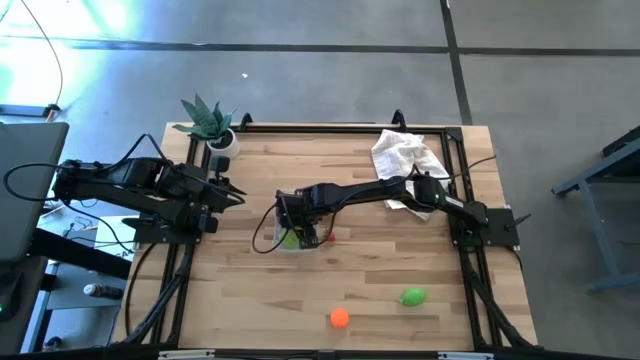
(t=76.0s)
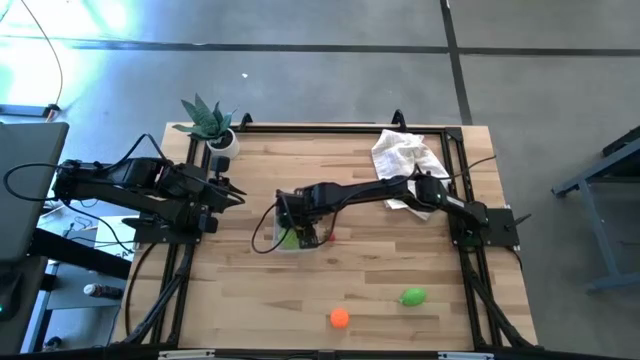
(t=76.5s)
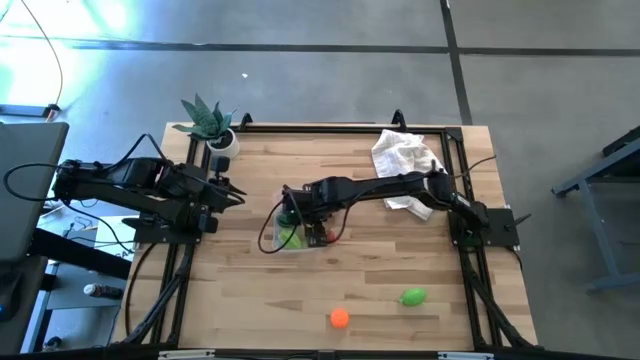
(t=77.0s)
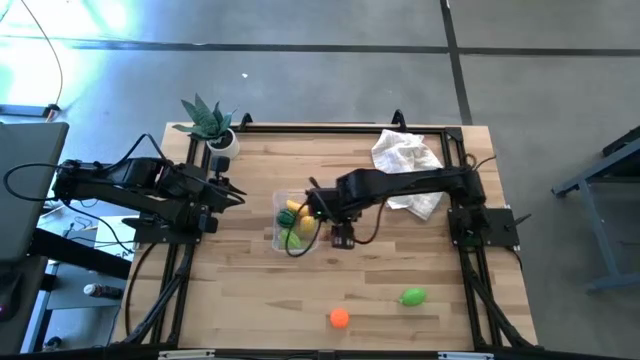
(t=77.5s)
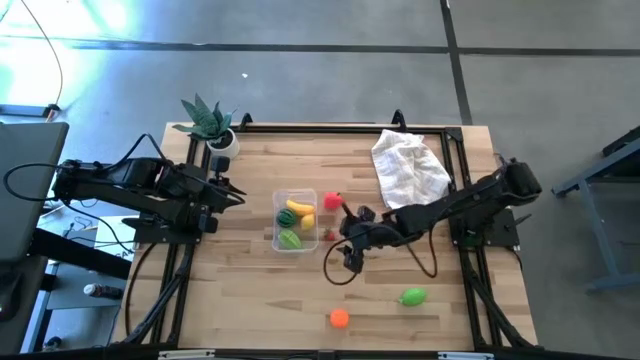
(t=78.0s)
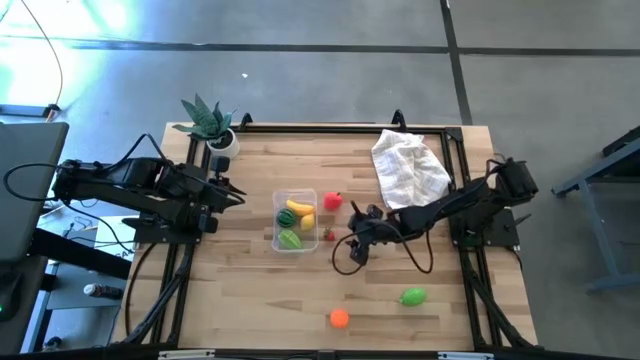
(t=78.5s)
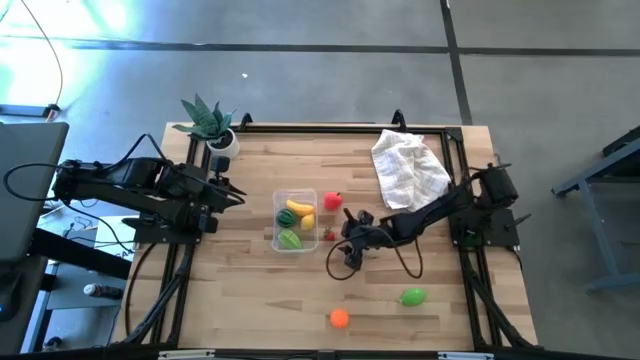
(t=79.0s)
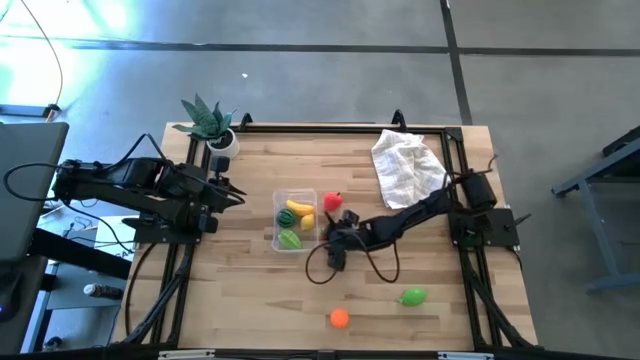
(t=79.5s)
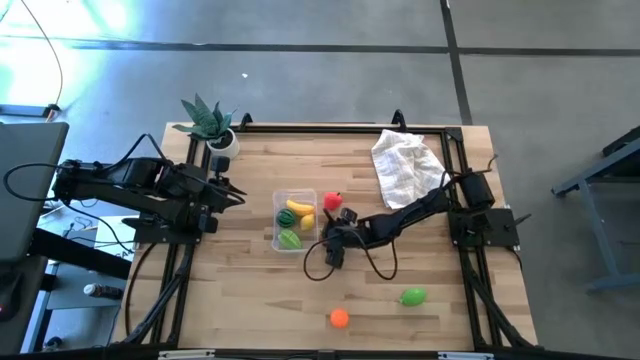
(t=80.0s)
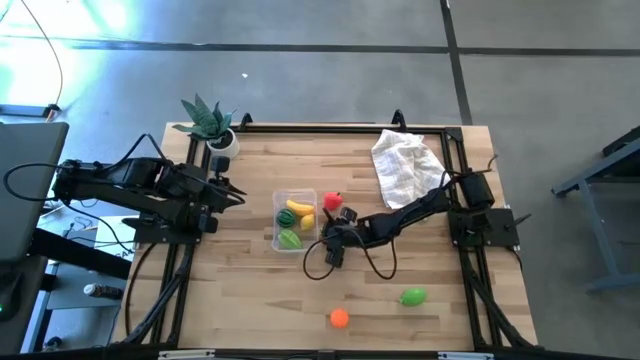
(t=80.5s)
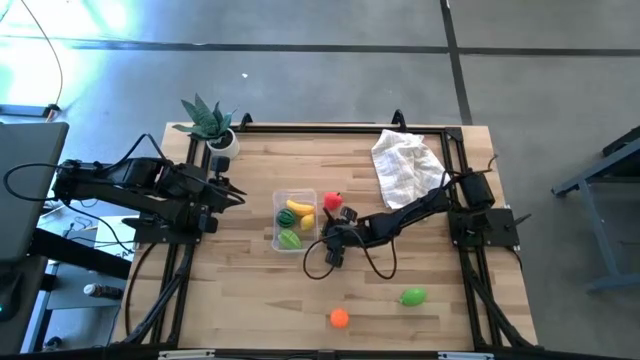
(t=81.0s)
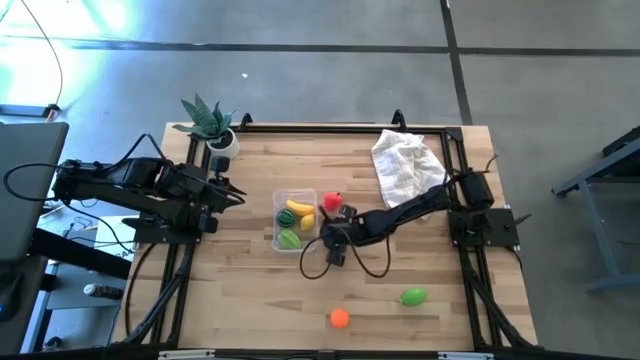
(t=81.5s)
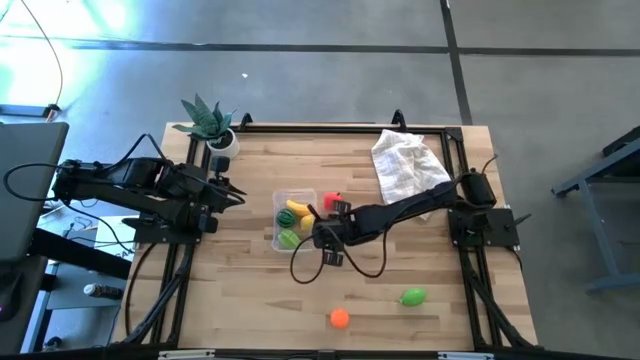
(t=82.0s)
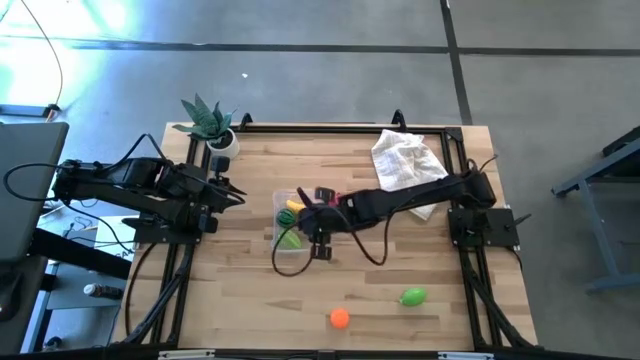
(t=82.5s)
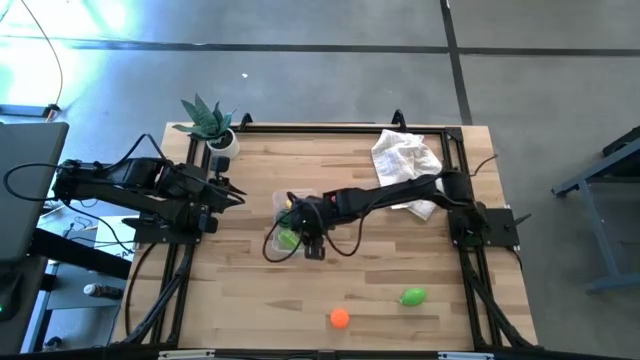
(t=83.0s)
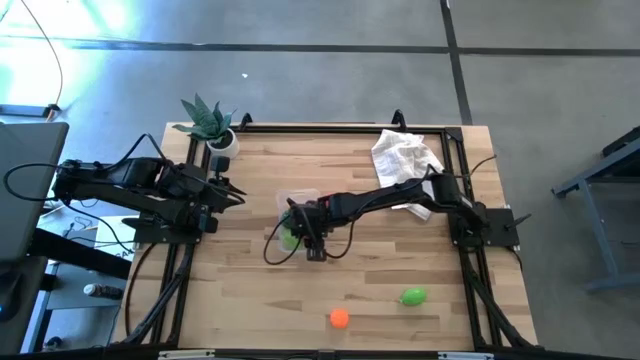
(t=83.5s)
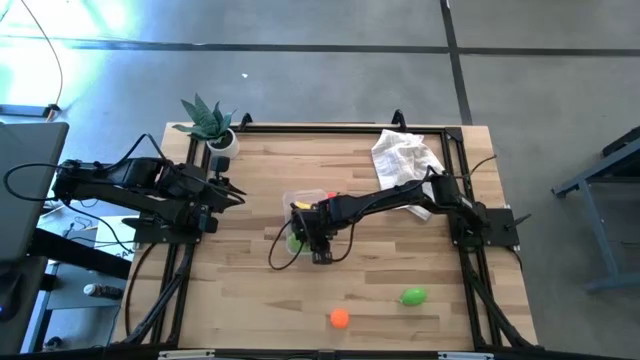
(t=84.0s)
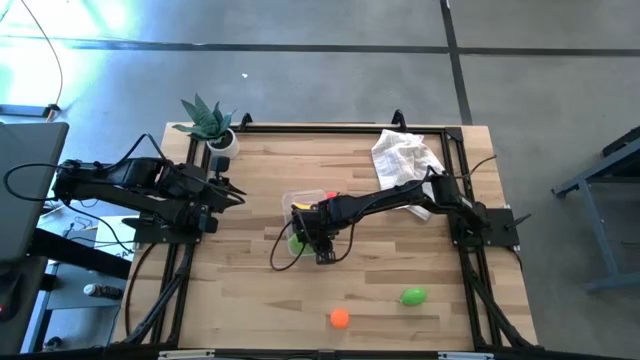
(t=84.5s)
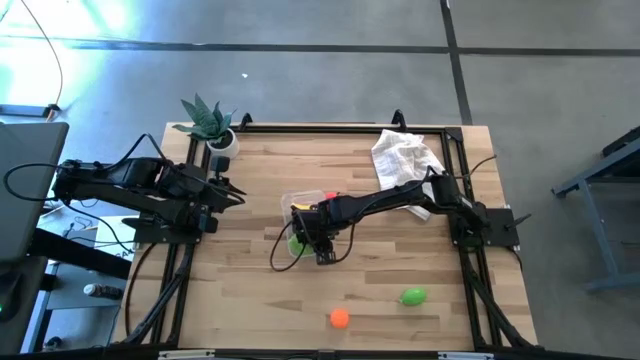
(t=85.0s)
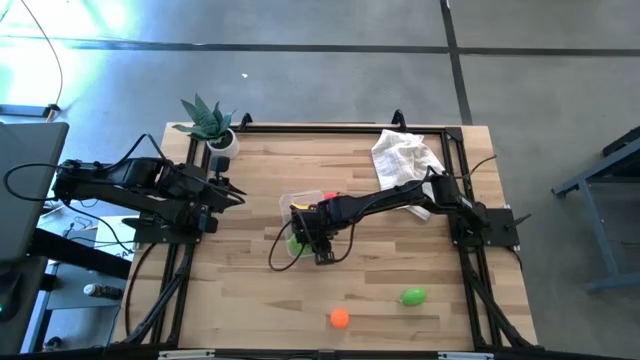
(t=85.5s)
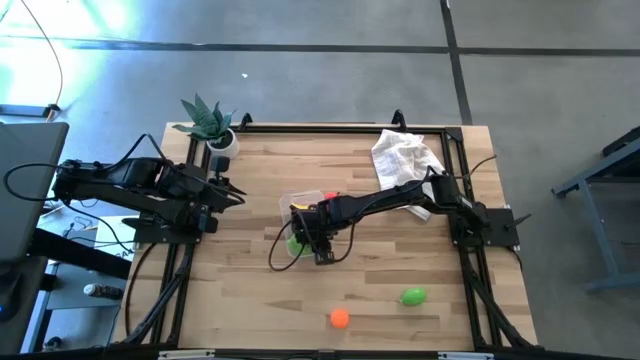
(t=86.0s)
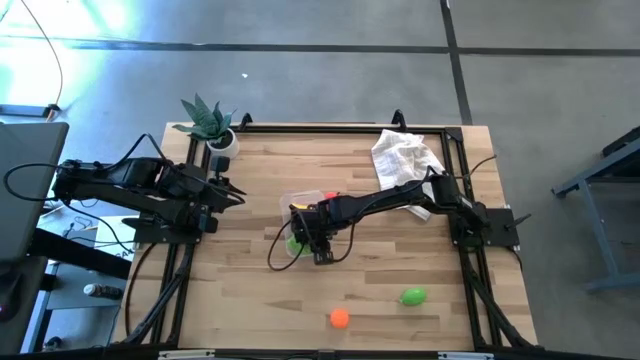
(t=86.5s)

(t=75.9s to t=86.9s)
Task: Pick and placing Produce into tupperware
Put the strawberry into the bin

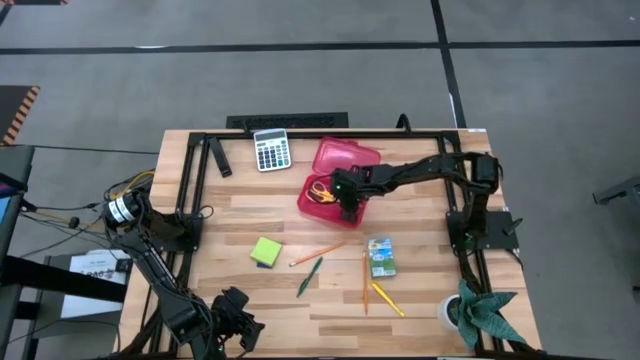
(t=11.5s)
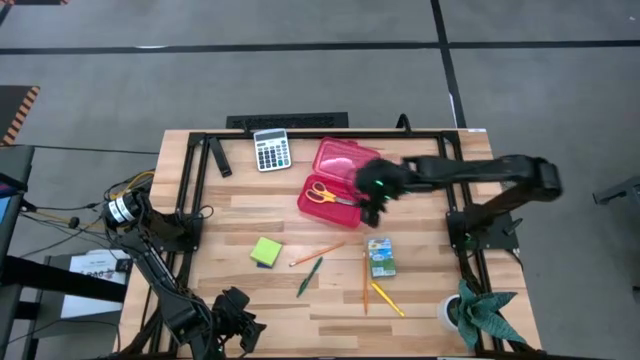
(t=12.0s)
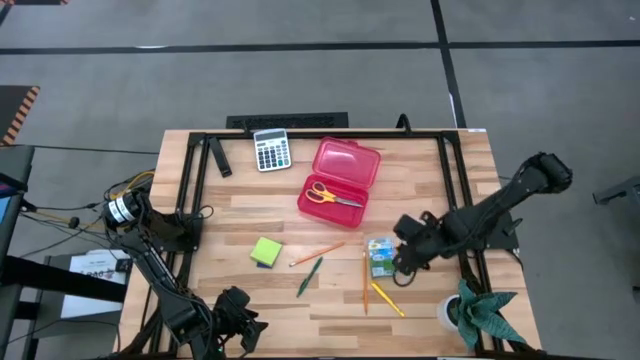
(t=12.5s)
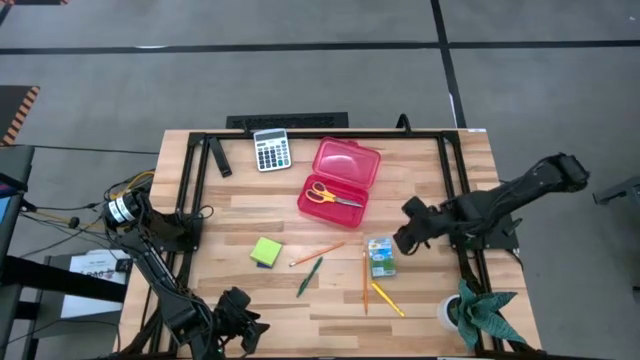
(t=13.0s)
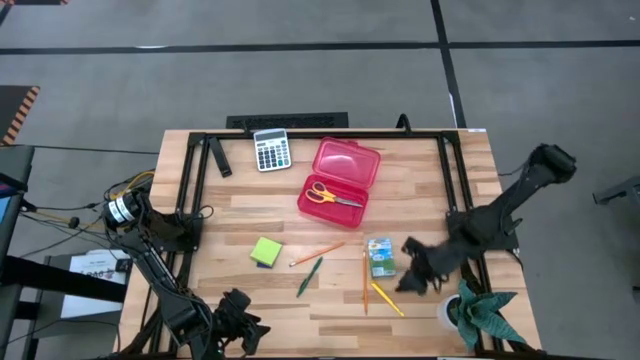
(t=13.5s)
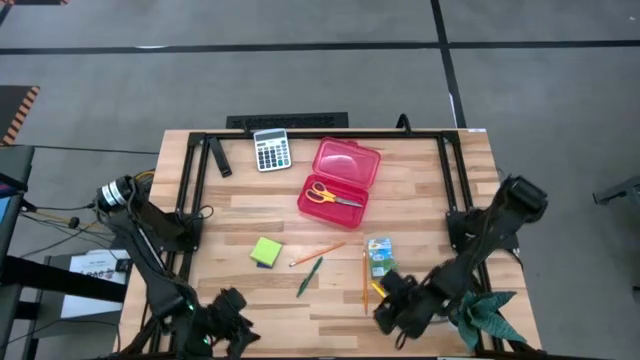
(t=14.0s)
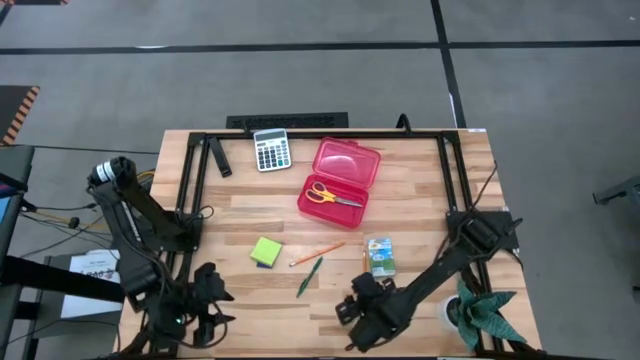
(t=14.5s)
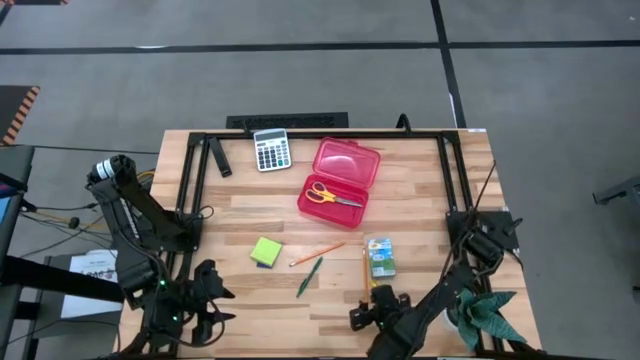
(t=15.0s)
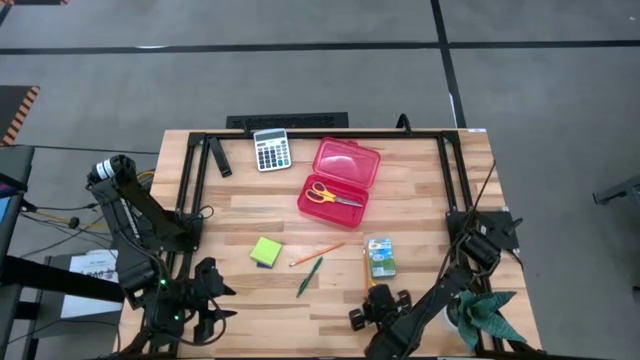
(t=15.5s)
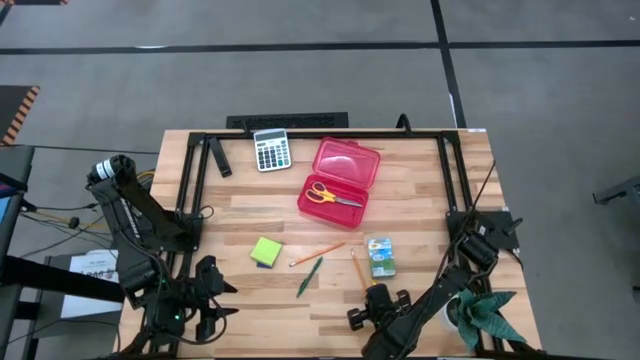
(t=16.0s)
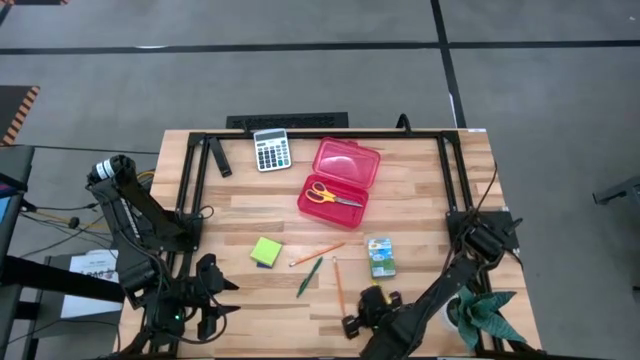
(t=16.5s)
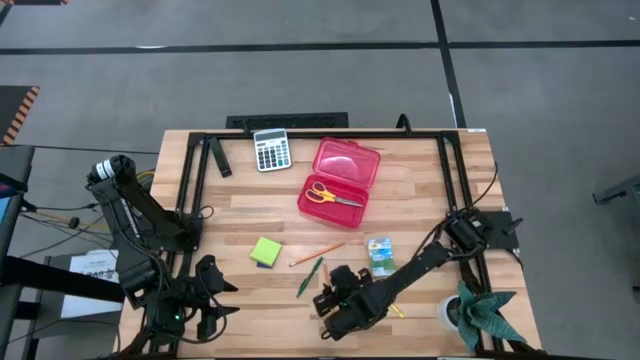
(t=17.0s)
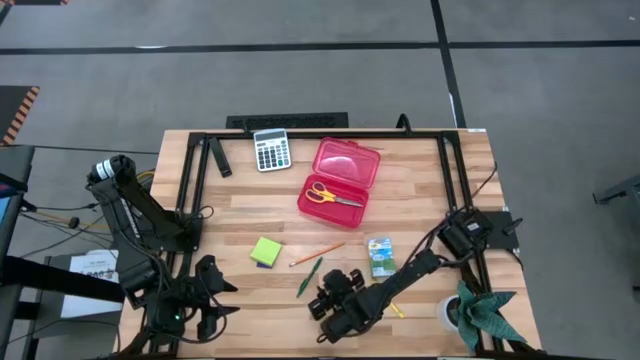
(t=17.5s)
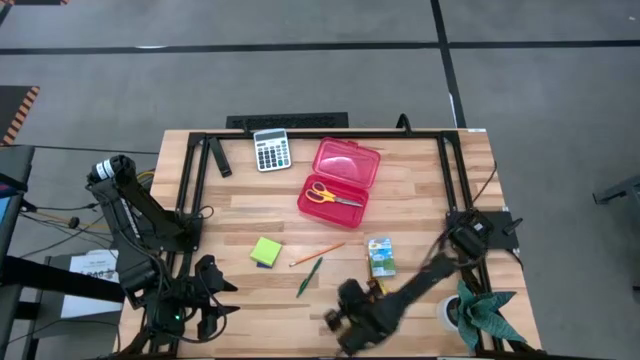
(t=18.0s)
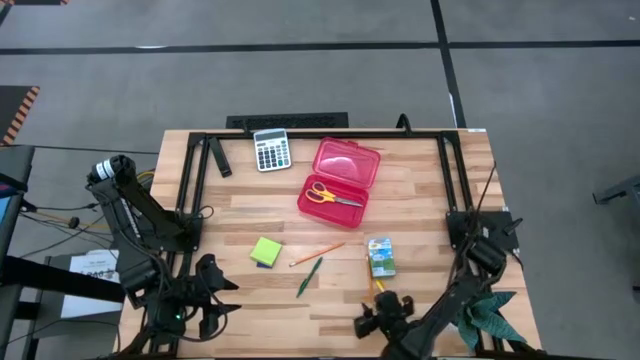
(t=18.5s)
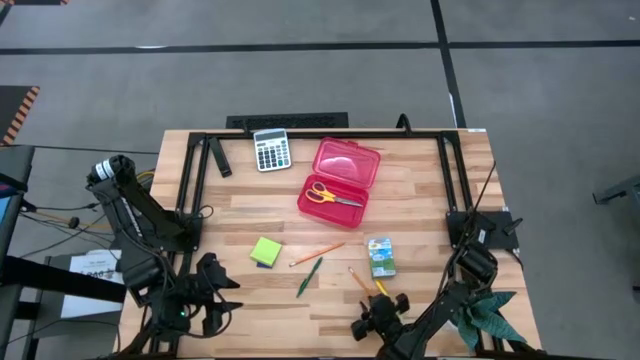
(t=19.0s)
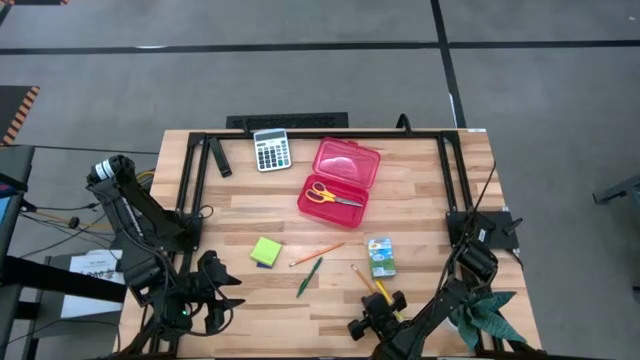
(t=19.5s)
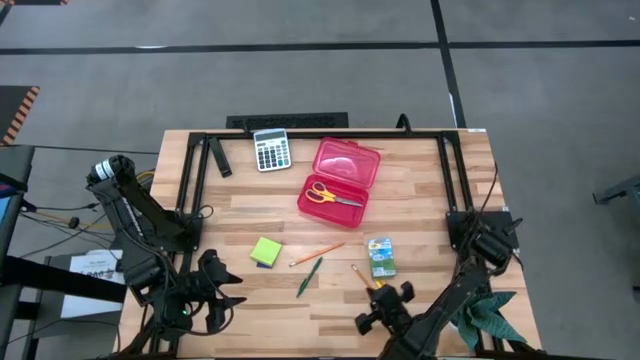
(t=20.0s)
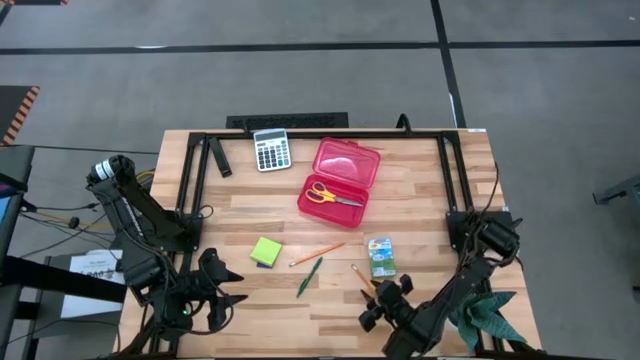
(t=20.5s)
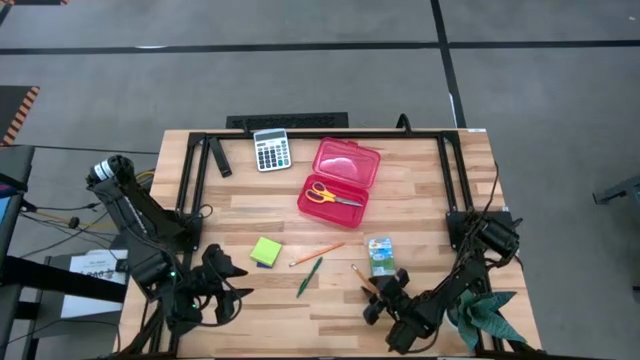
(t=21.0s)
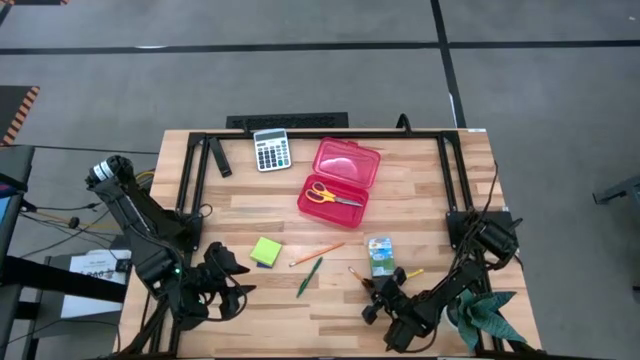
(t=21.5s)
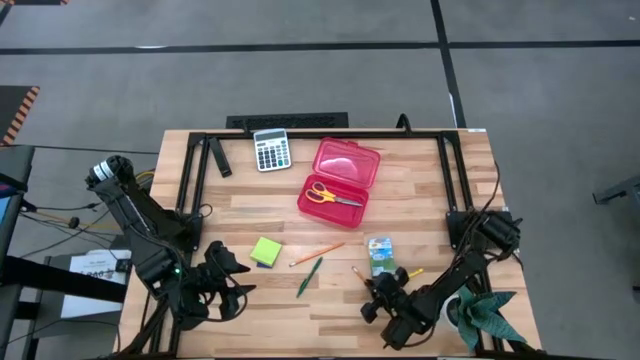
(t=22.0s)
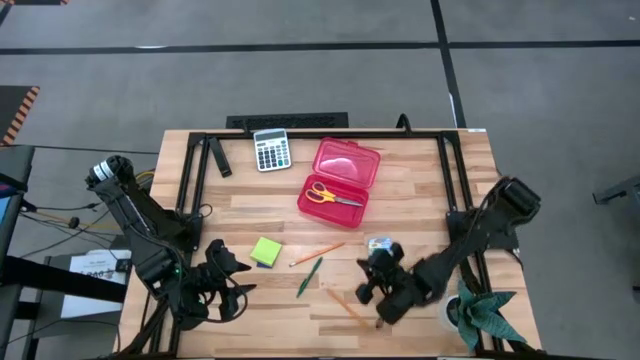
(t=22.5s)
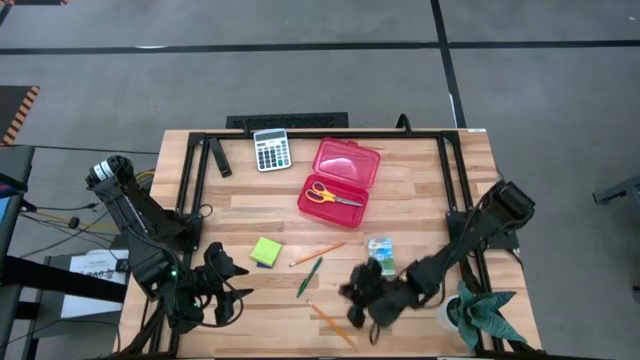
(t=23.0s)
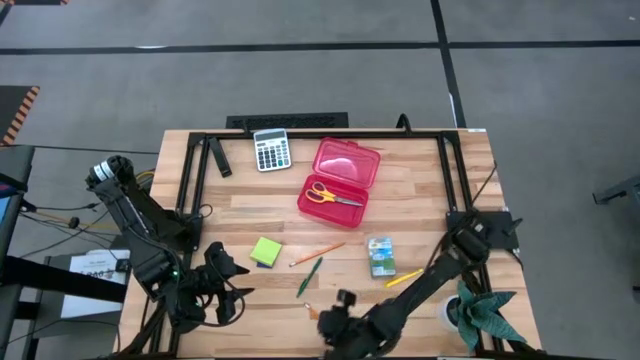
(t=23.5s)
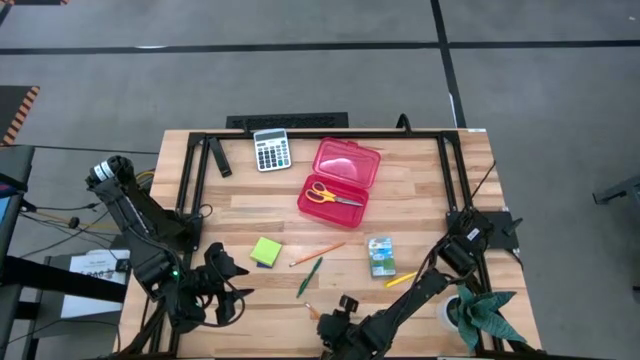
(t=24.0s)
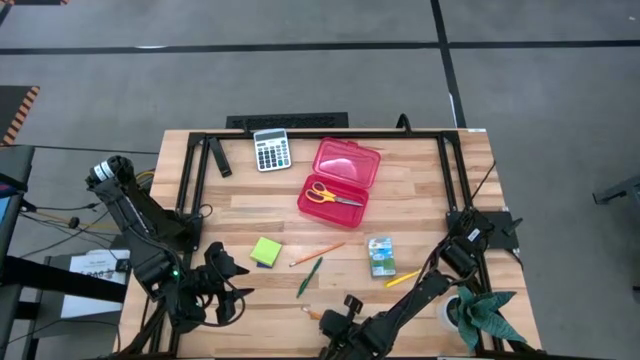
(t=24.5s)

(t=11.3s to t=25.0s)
Task: Pack school essentials
Put the bottom pencil into the supply box
